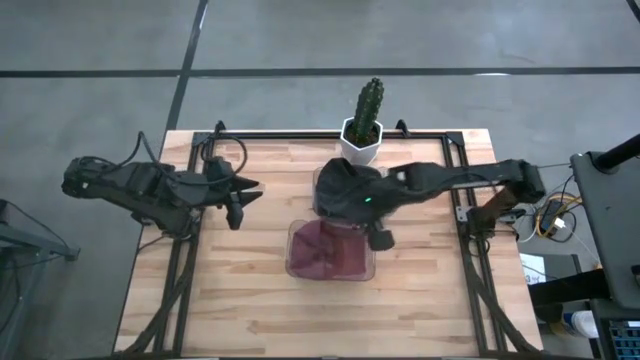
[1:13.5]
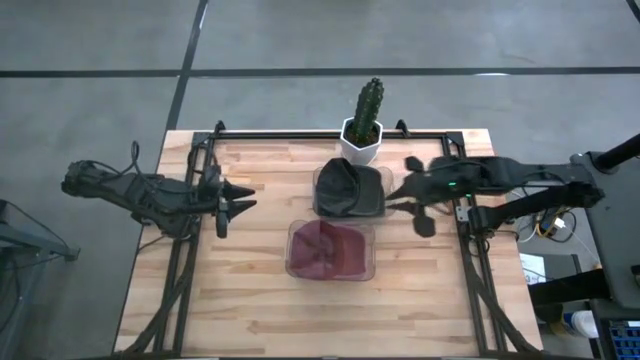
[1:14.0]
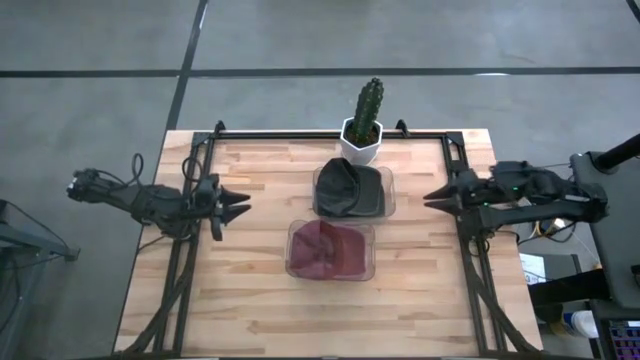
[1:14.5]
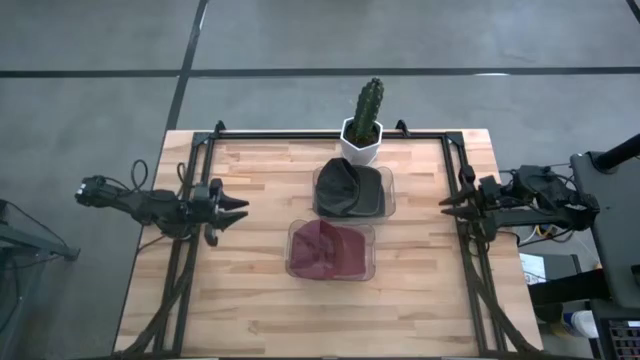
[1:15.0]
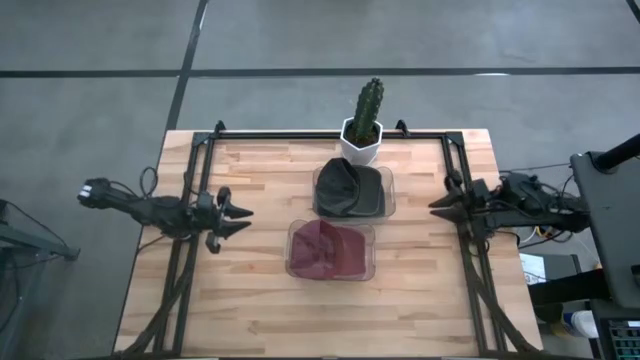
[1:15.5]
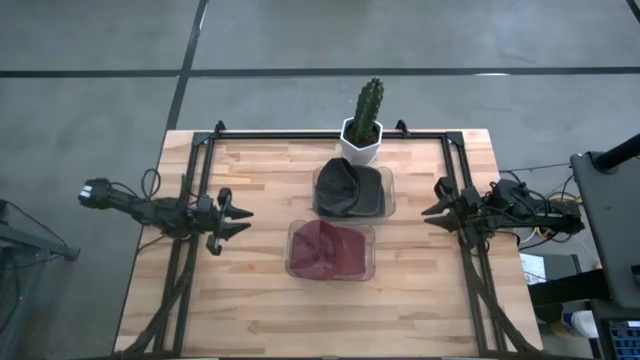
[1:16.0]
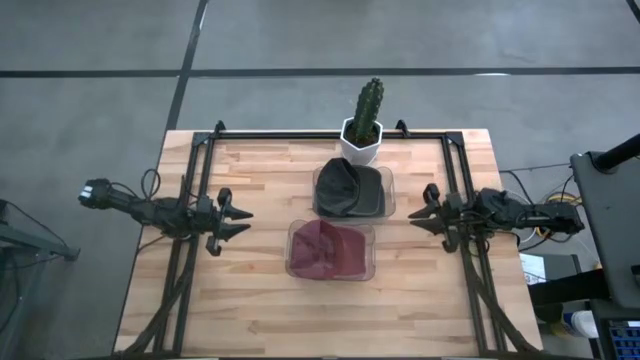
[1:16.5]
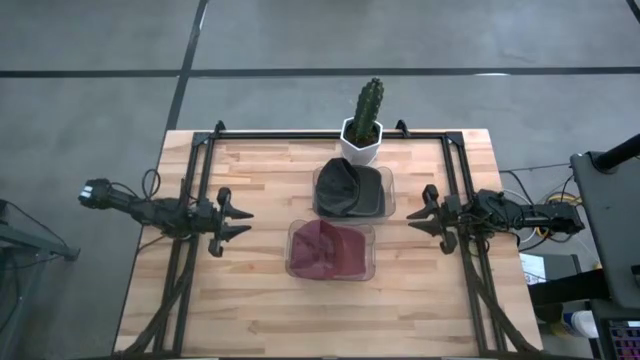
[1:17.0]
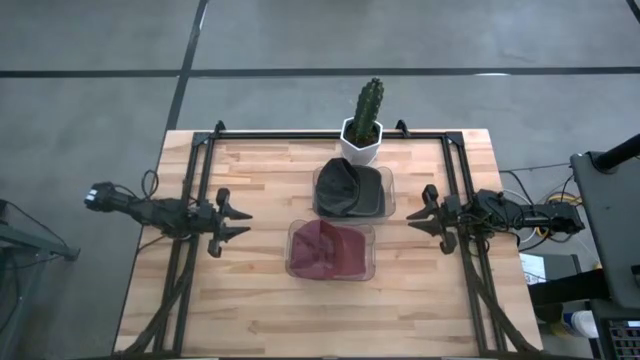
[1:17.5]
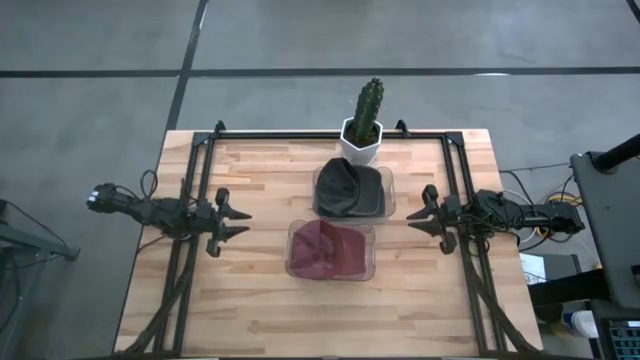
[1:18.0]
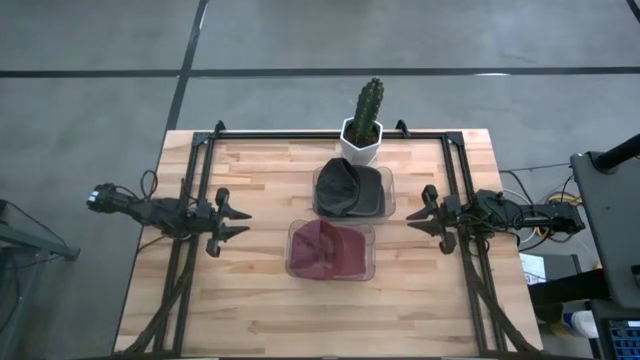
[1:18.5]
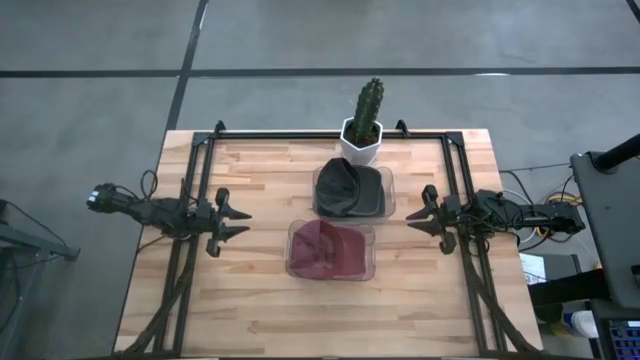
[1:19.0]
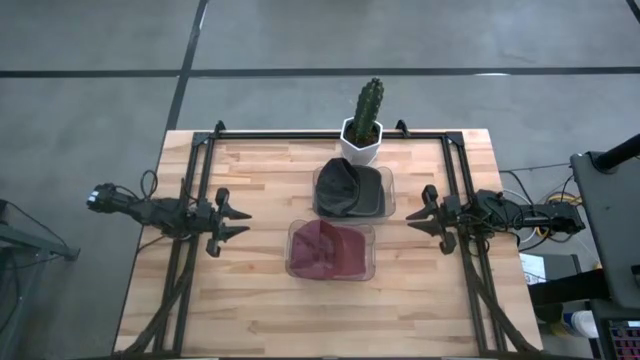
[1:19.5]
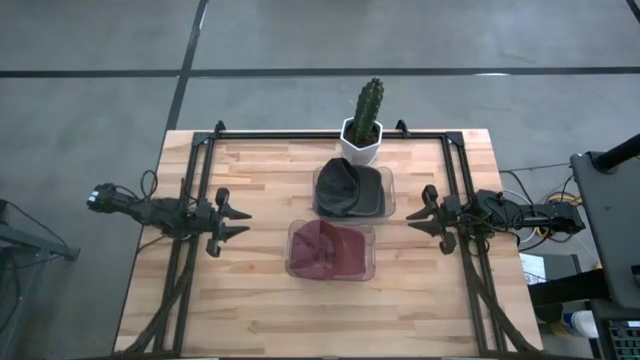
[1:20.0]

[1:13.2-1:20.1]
Task: Pick & Place hat
Return to Home Position

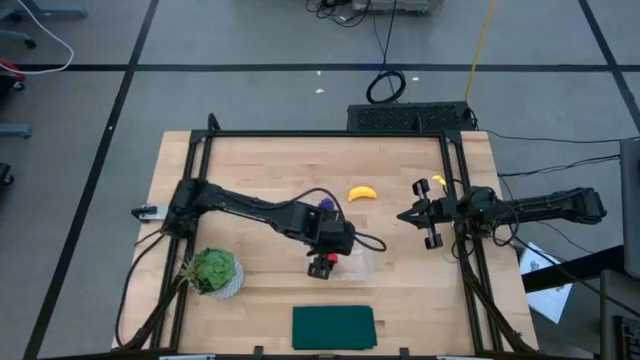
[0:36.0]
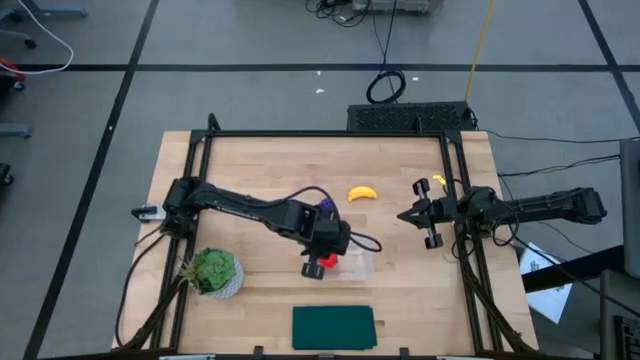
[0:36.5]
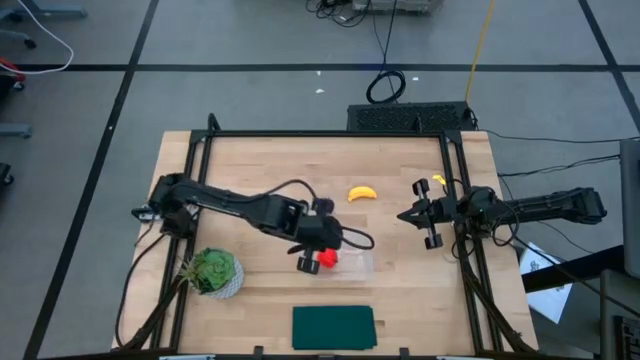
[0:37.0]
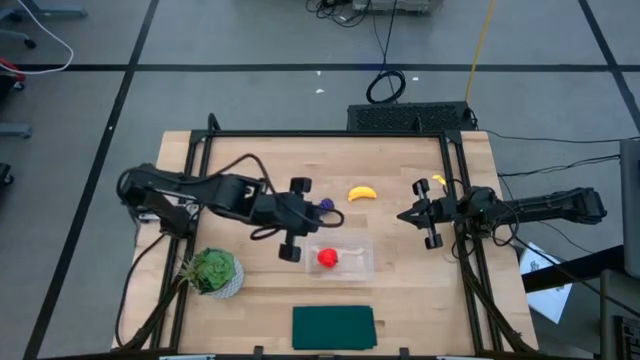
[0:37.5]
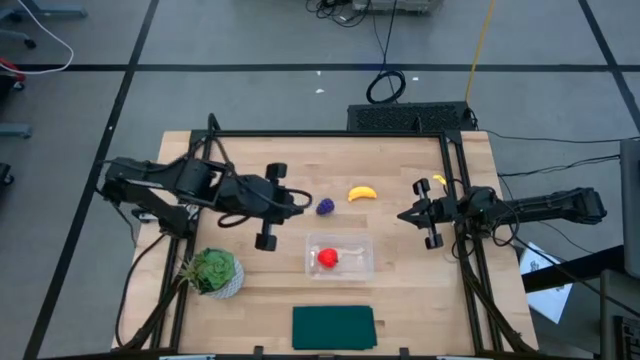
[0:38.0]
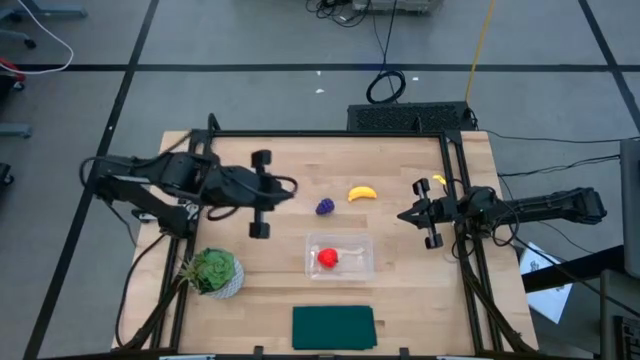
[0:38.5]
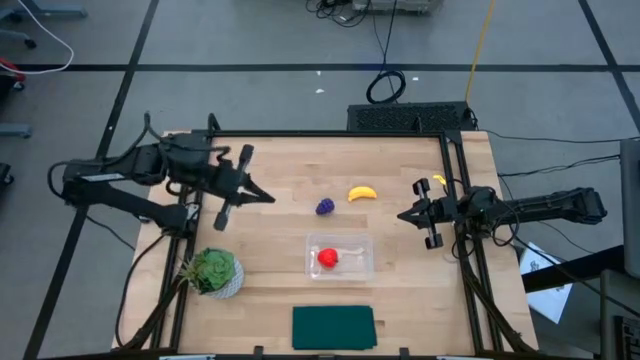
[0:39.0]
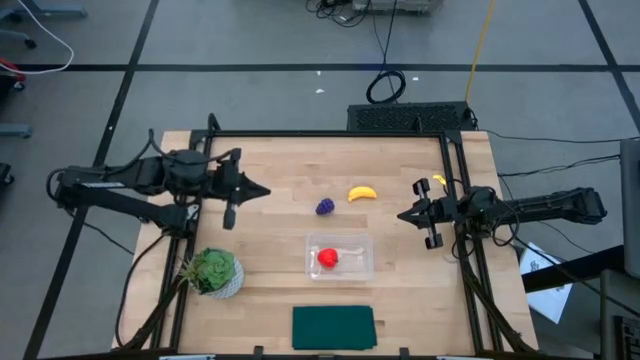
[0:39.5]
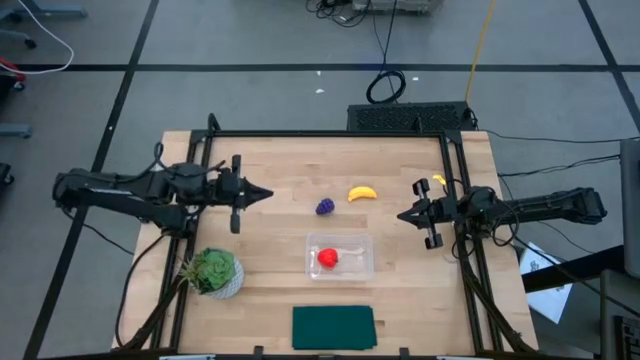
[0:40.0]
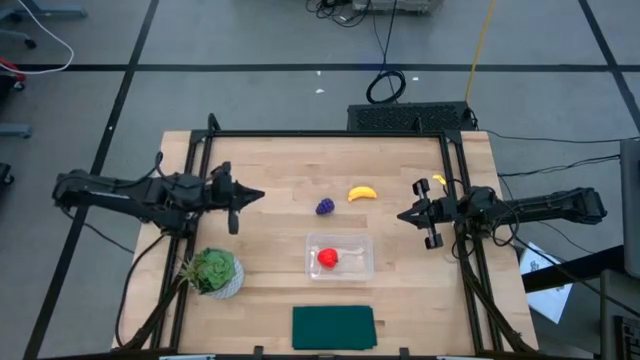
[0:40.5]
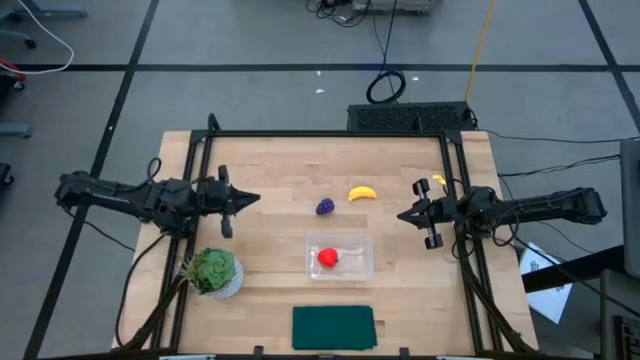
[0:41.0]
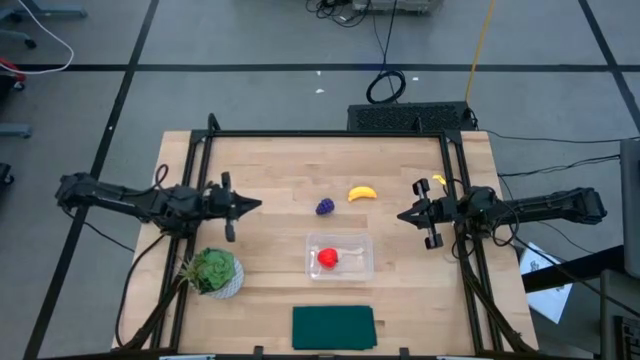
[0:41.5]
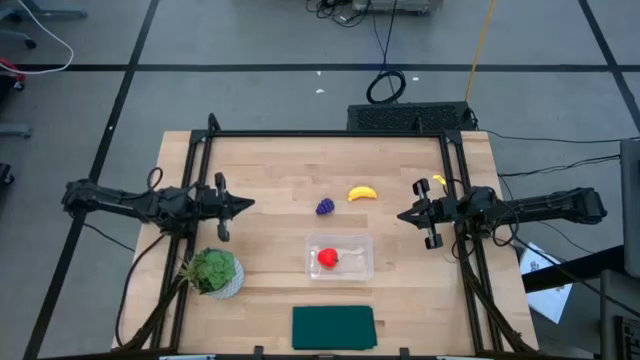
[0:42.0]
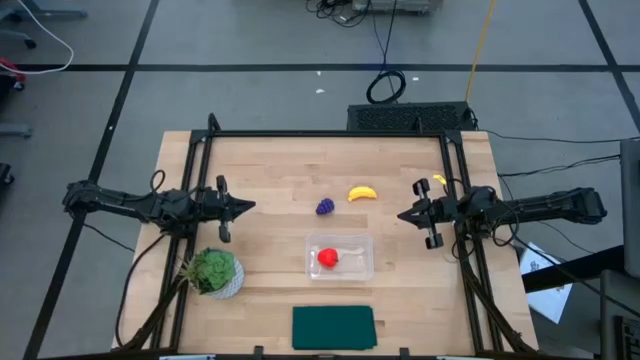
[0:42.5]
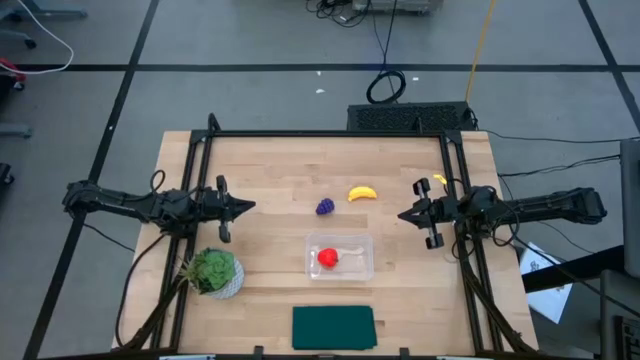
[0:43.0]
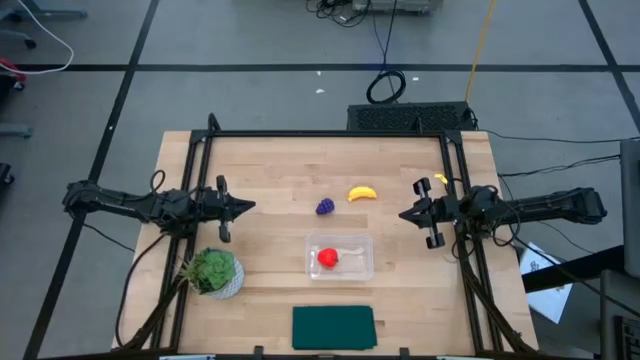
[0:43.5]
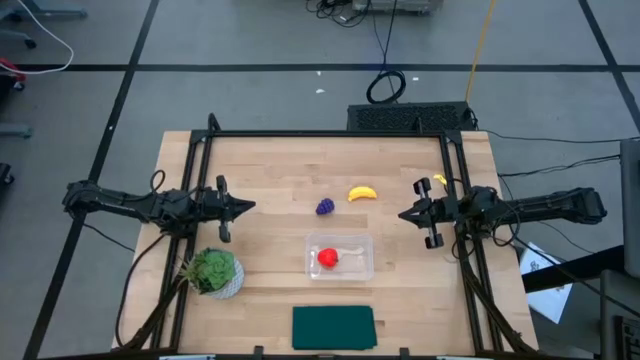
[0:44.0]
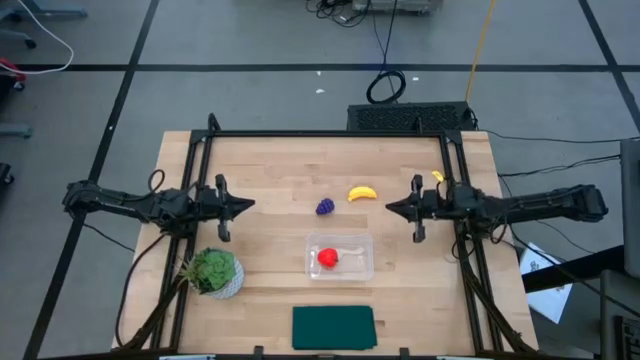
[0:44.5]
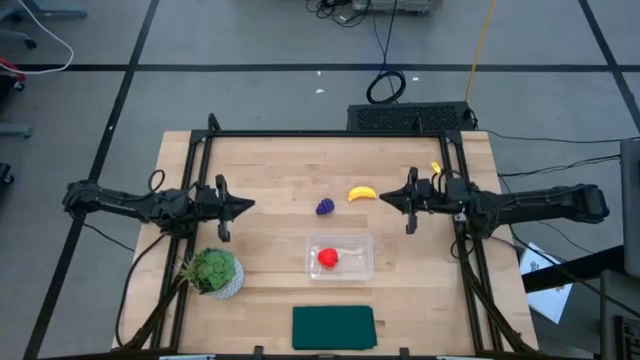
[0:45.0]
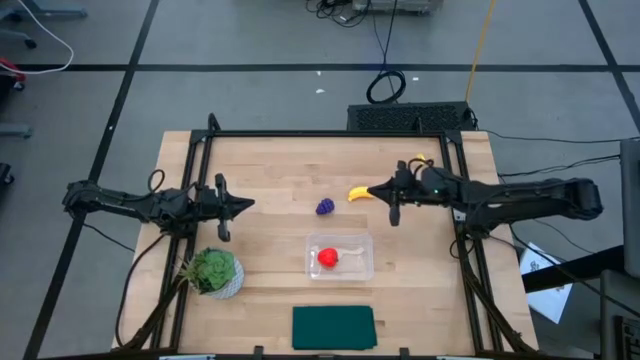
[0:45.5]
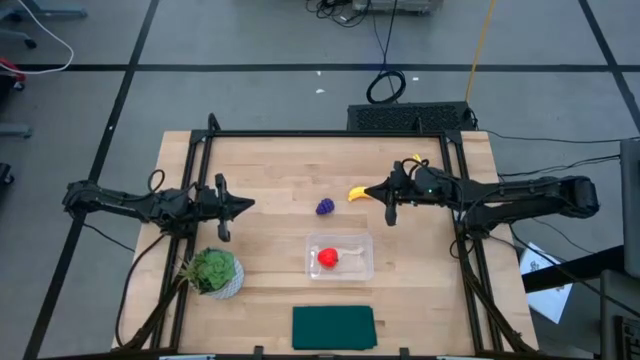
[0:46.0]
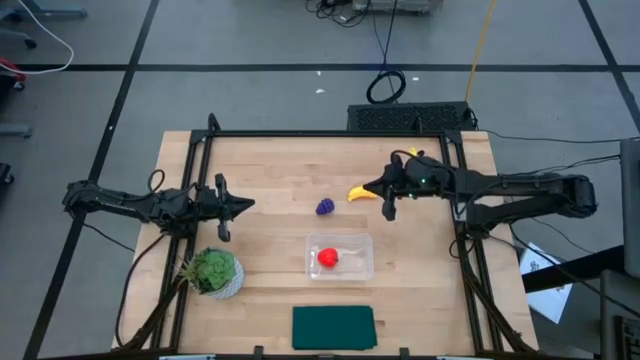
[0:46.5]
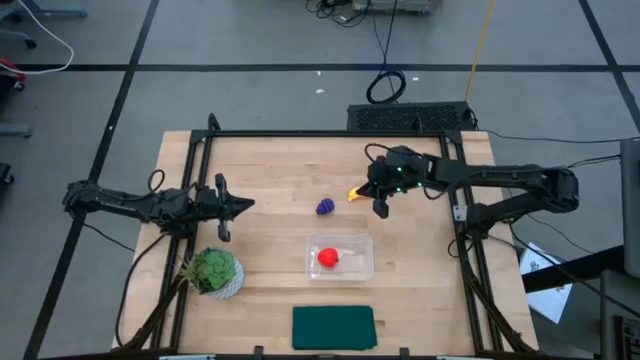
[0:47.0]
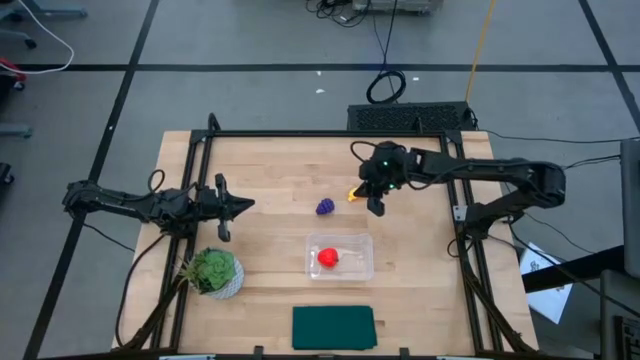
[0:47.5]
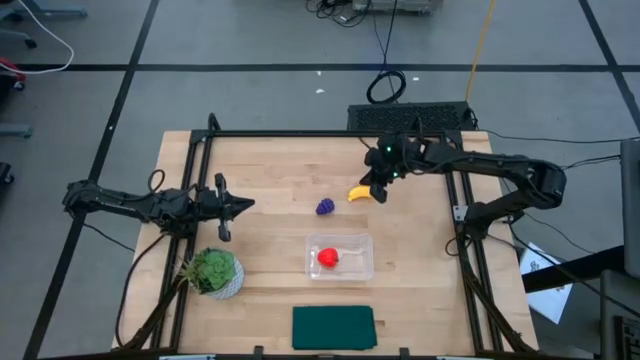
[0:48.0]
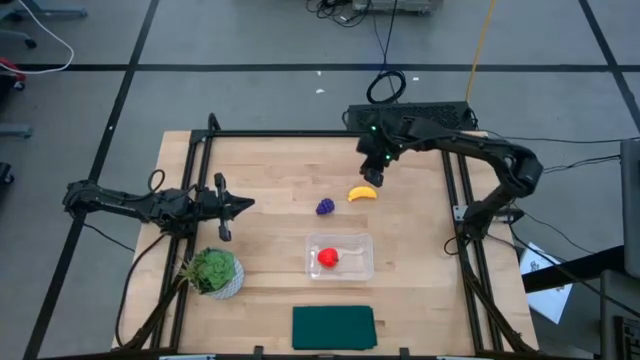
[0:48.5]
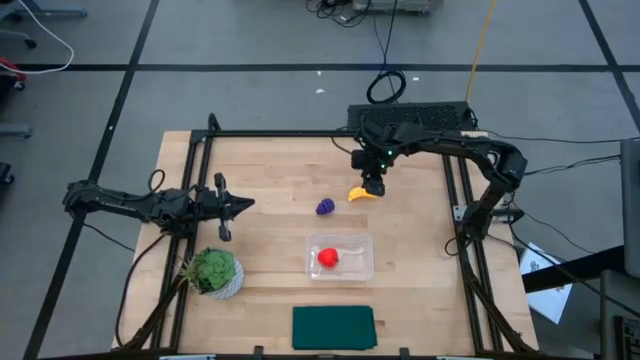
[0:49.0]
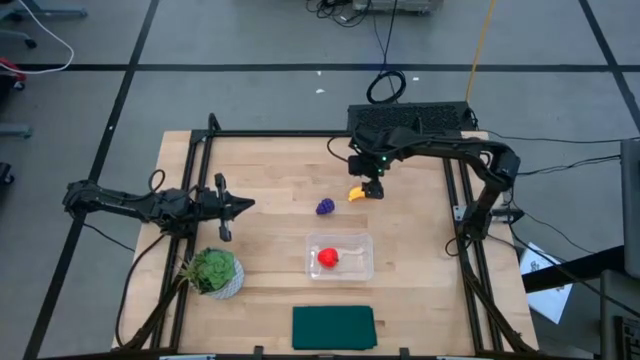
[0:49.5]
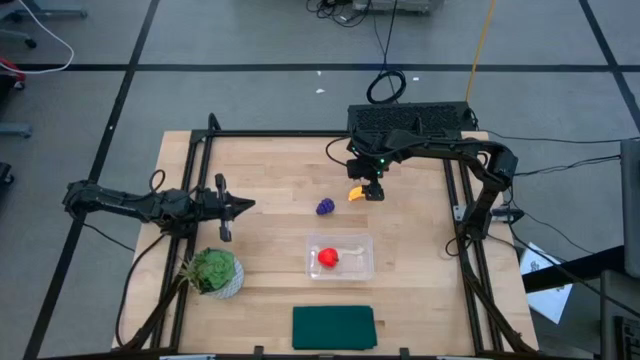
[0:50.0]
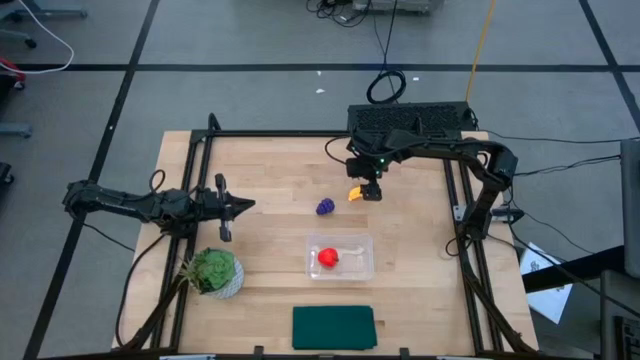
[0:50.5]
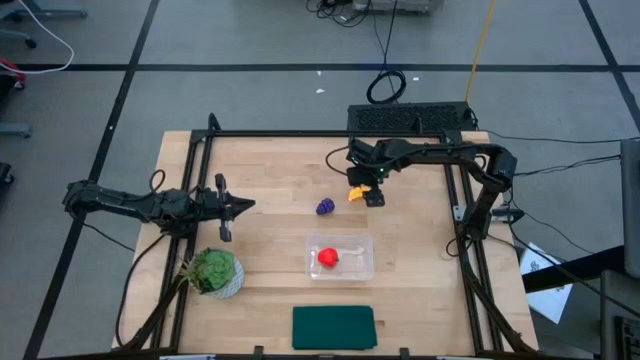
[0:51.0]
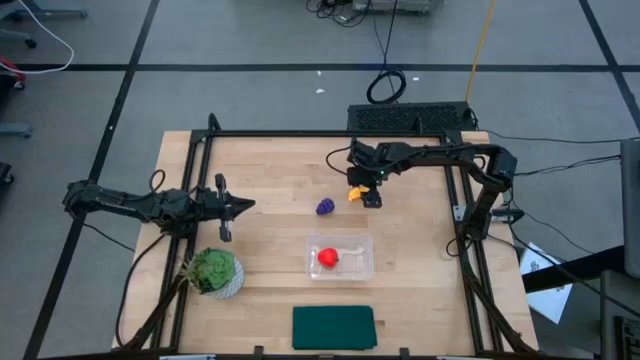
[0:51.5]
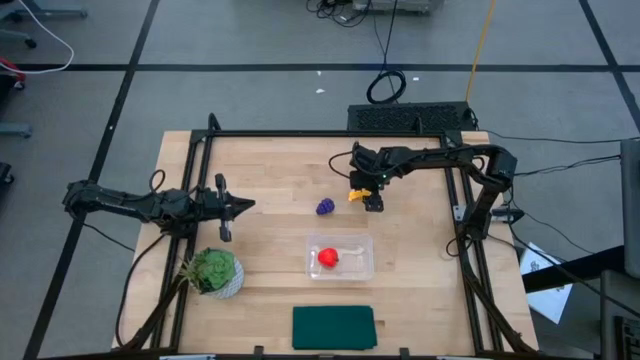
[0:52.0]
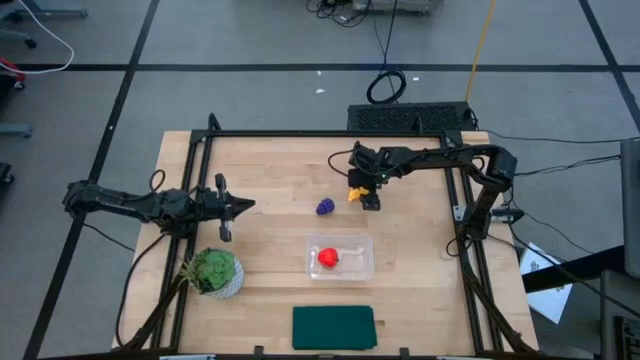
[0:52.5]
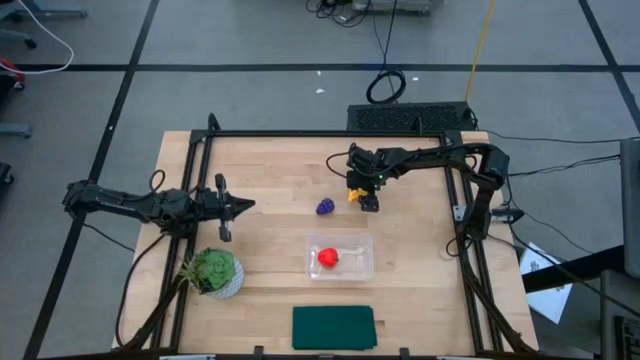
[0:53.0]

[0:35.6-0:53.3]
Task: Pick and placing Produce into tupperware
Put the banana into the transparent bin
